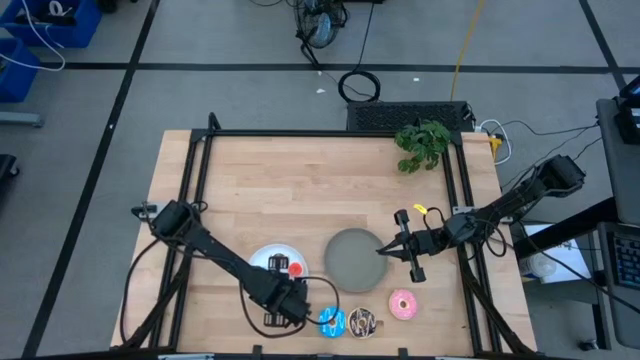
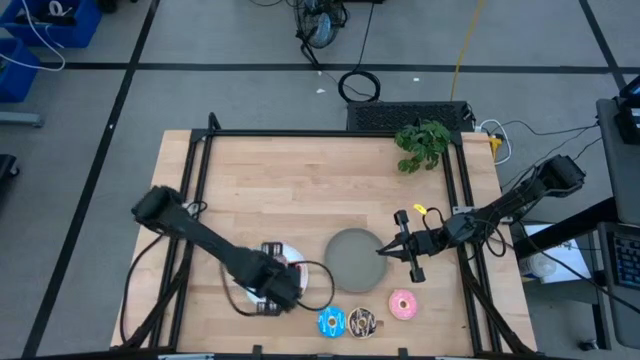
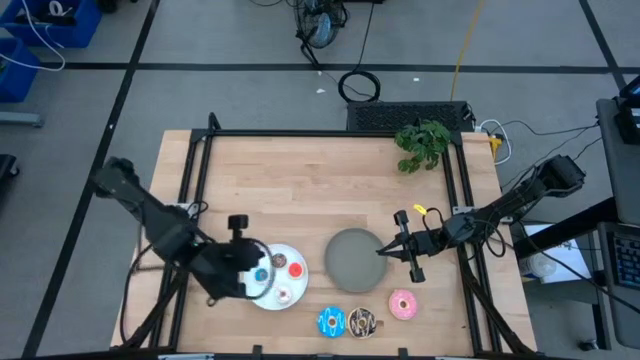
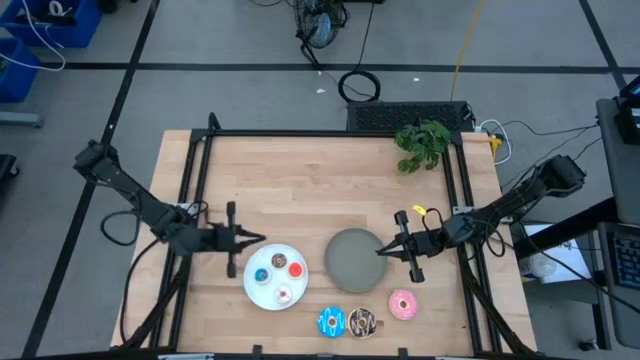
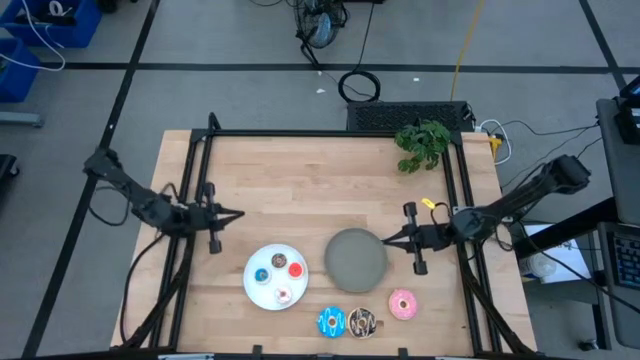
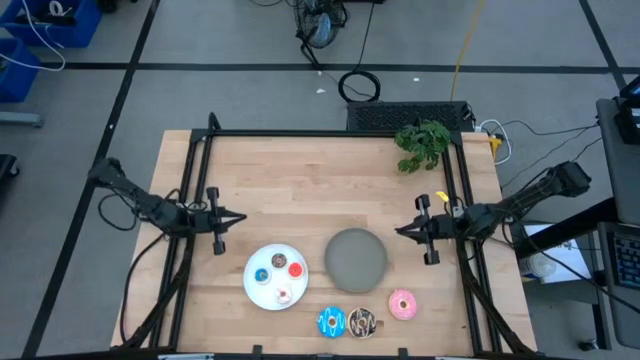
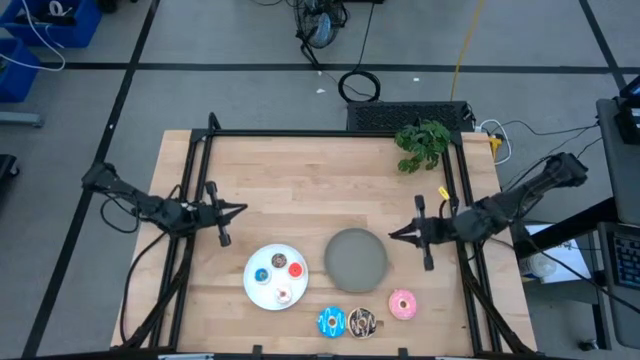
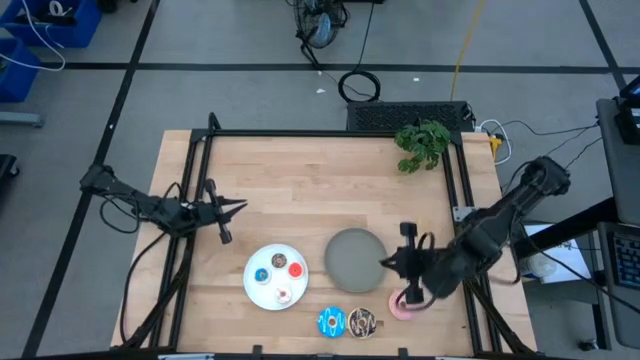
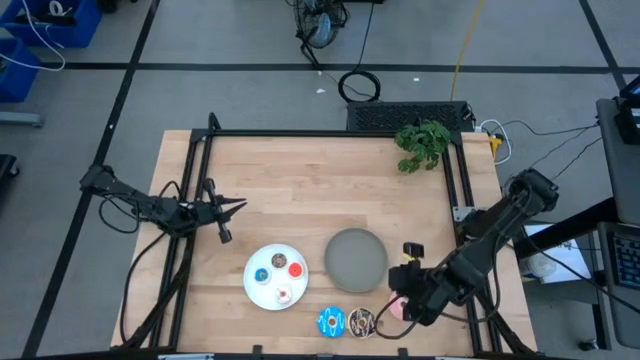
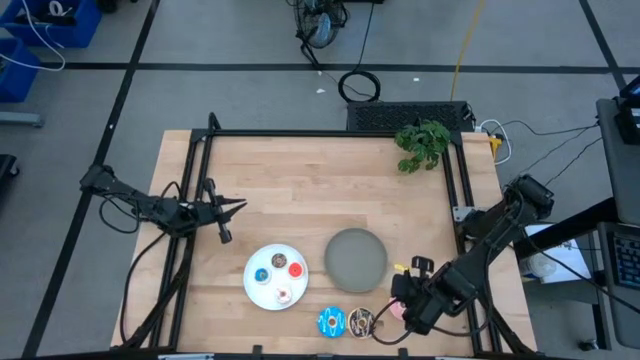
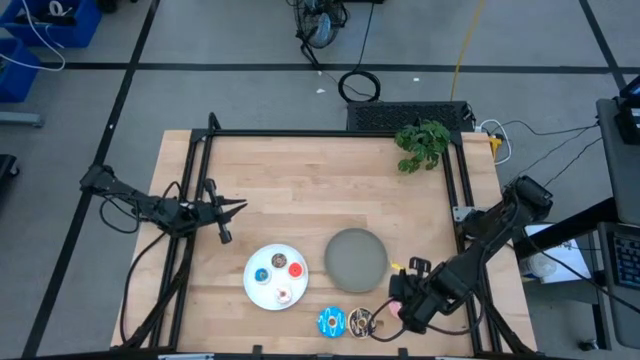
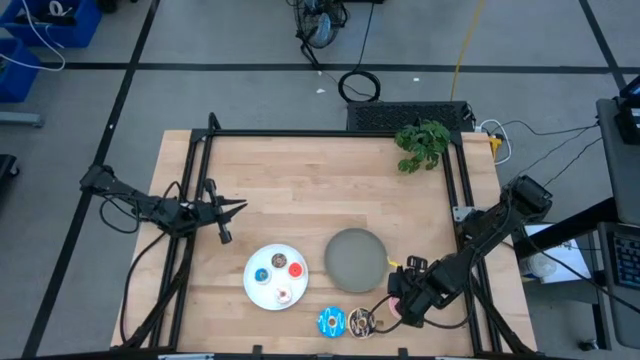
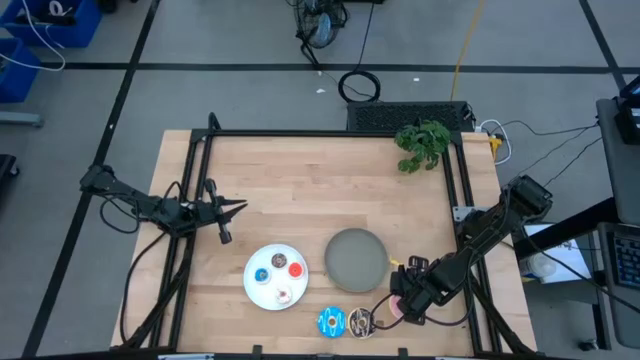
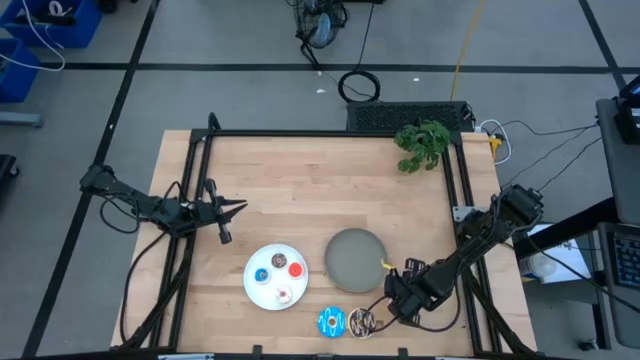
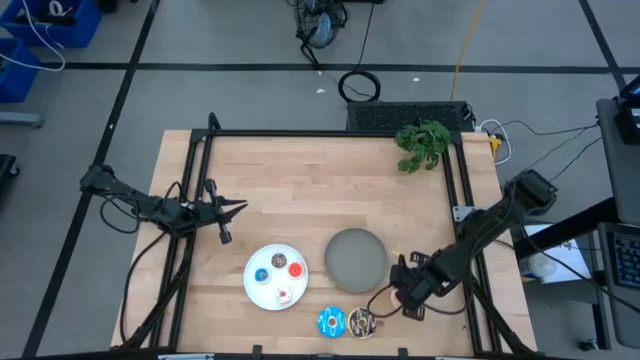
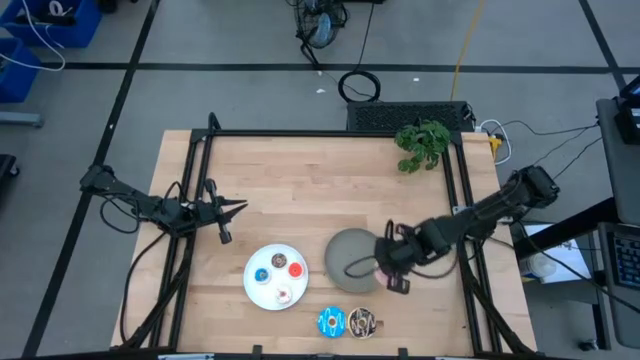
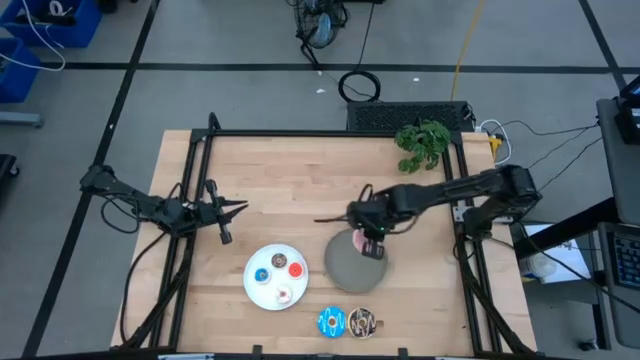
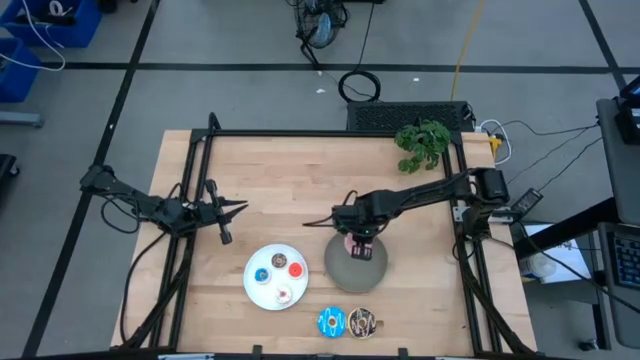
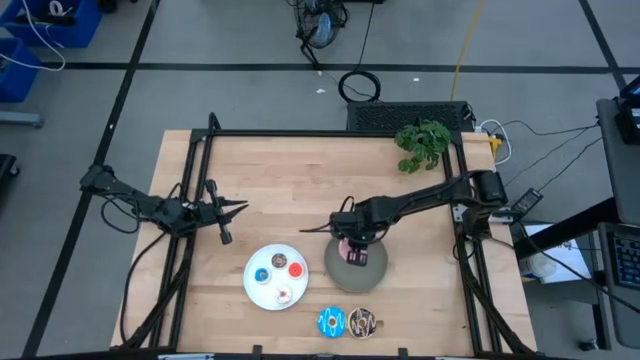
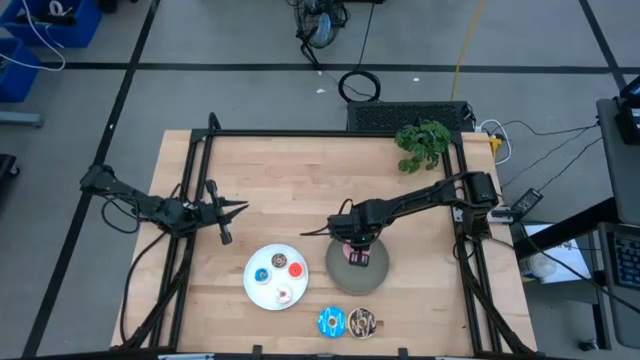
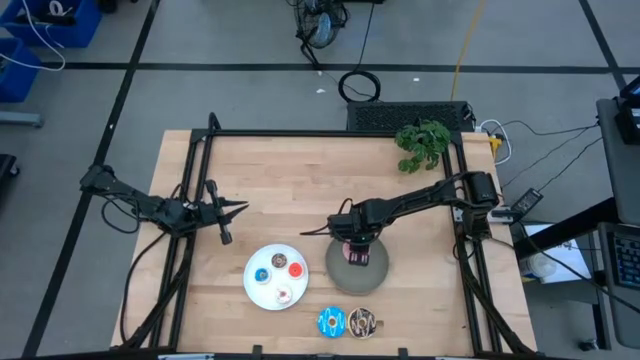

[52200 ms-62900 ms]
Task: Pick & Place donuts
Put the large pink donut on the gray plate

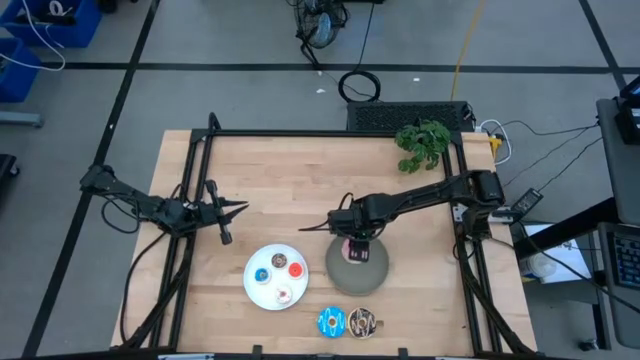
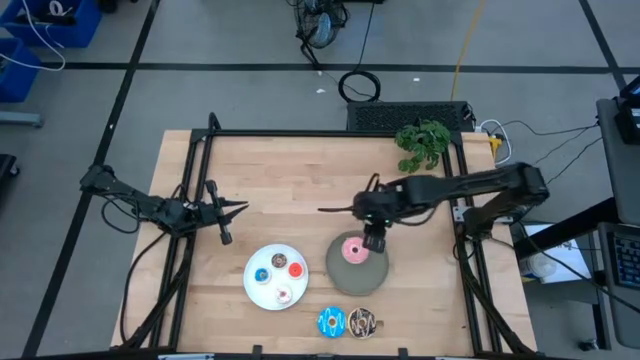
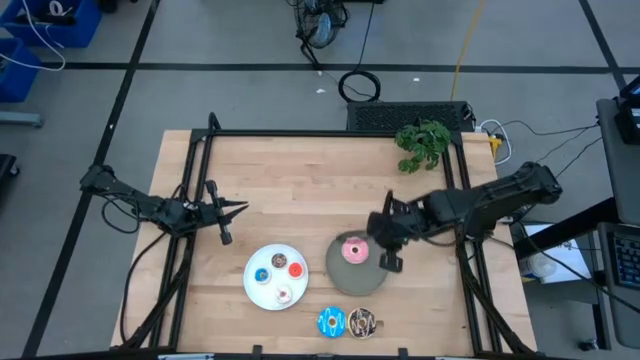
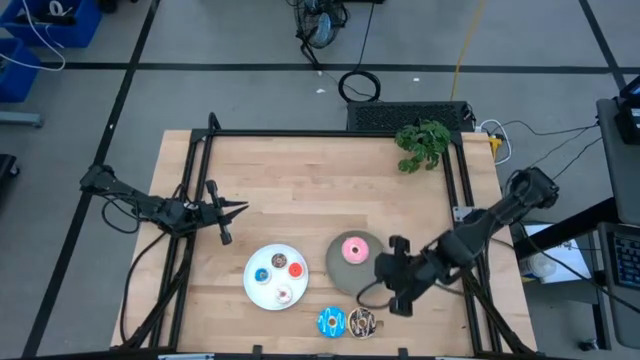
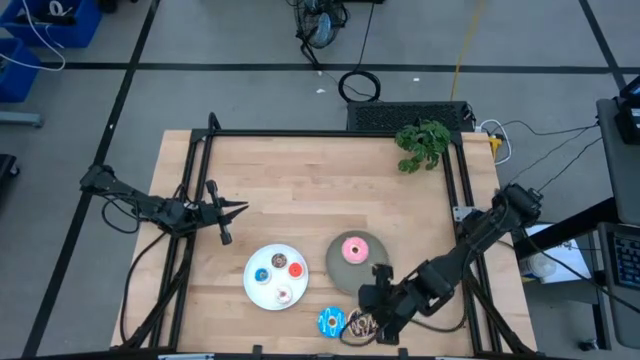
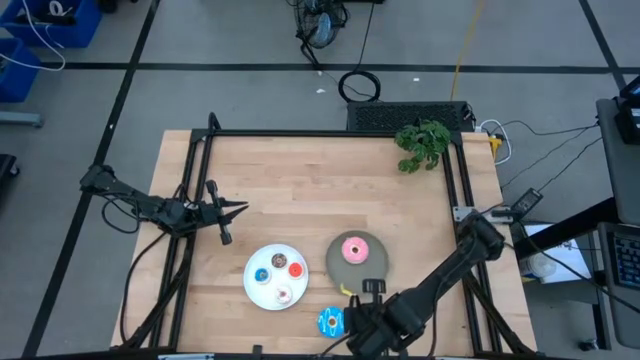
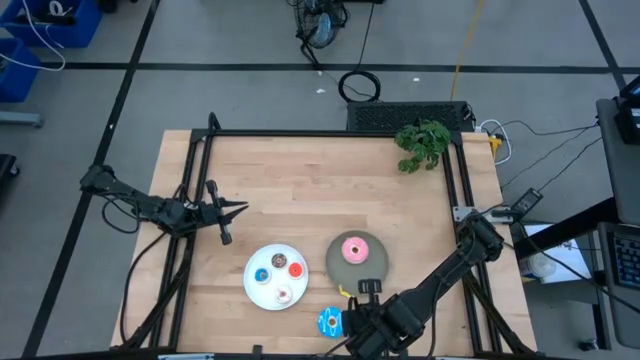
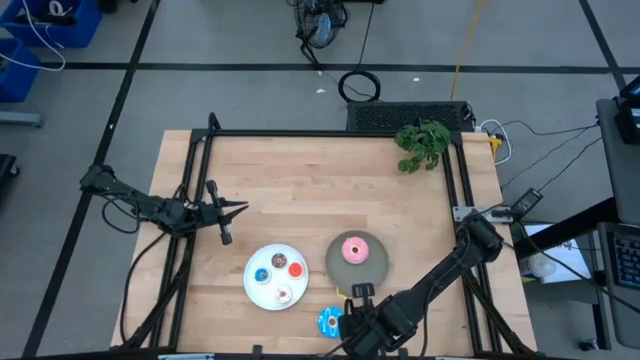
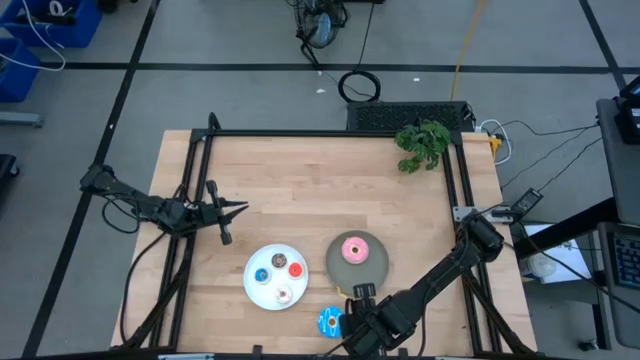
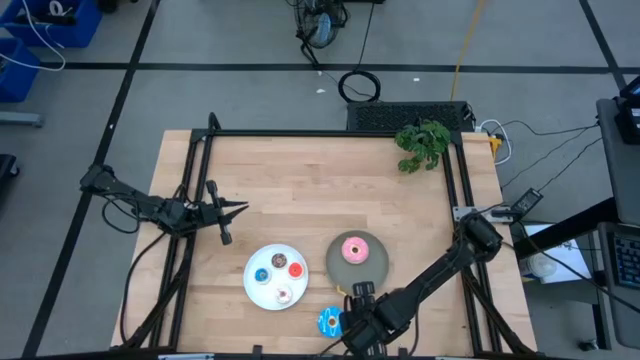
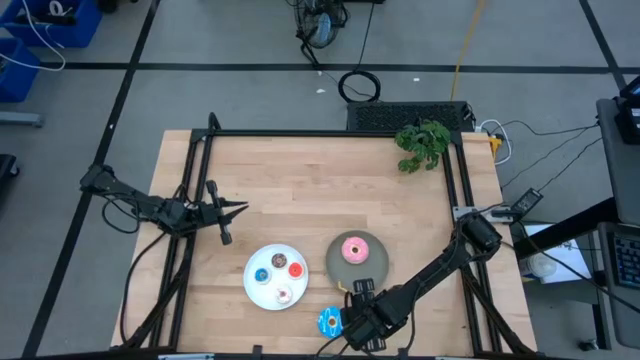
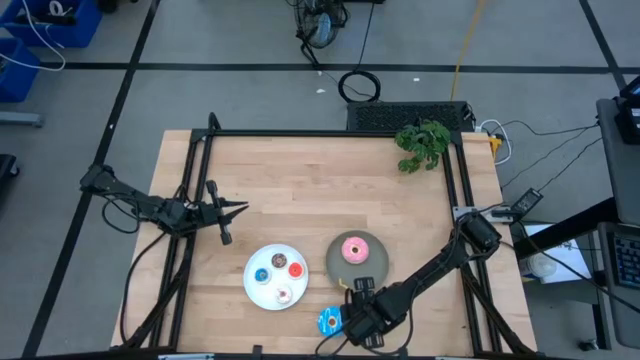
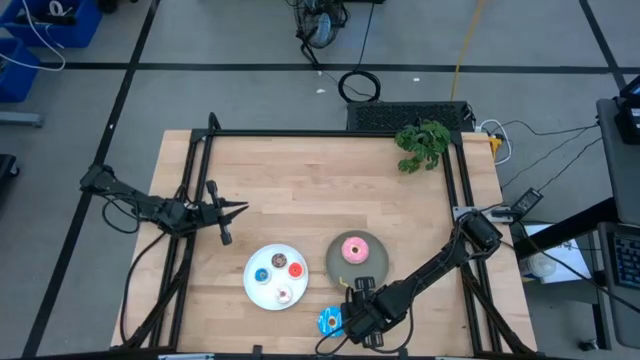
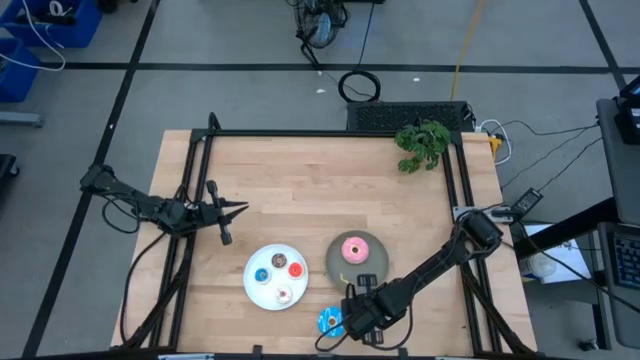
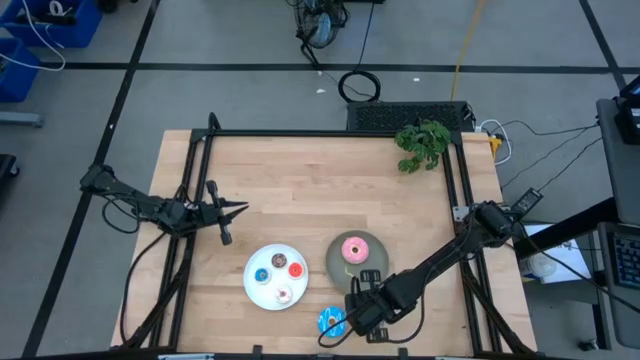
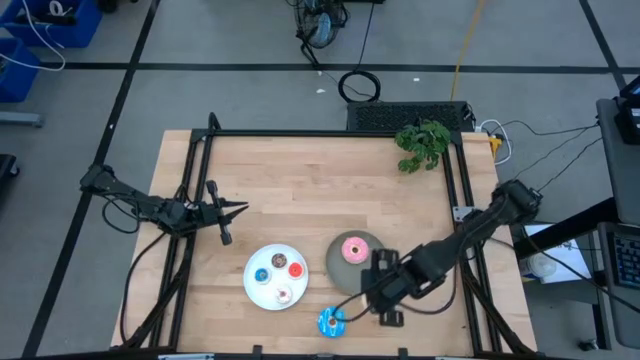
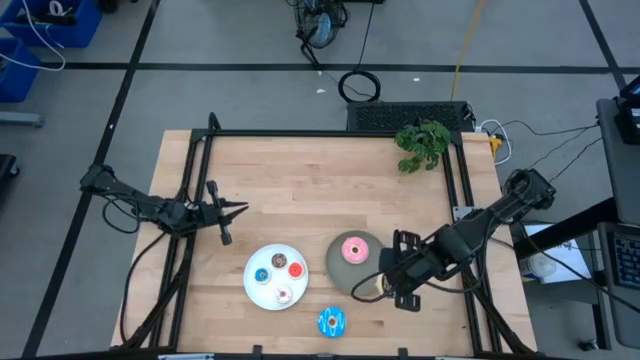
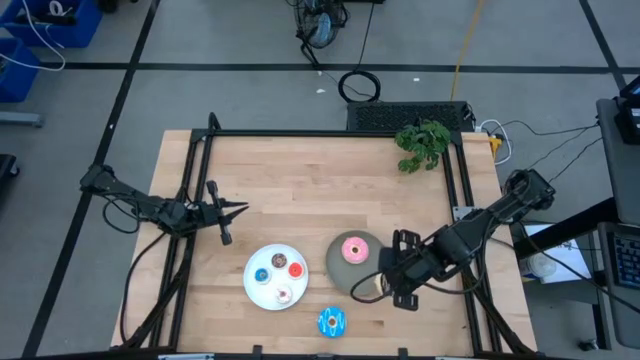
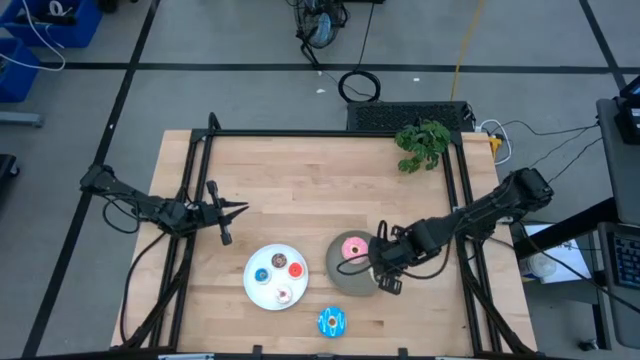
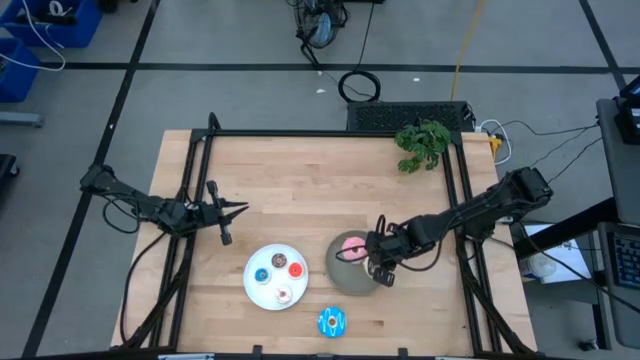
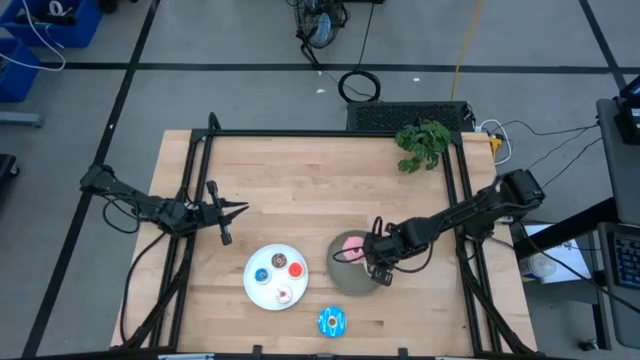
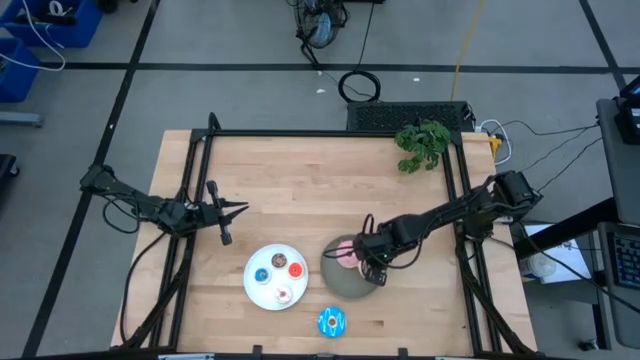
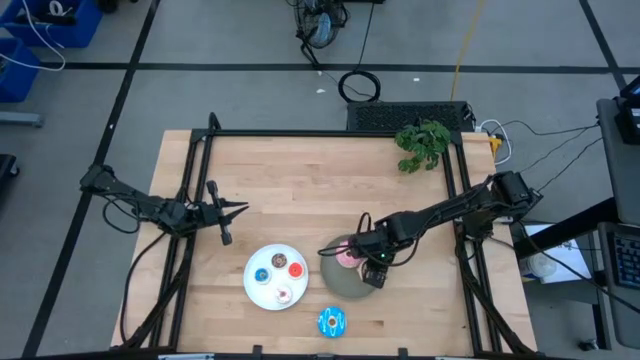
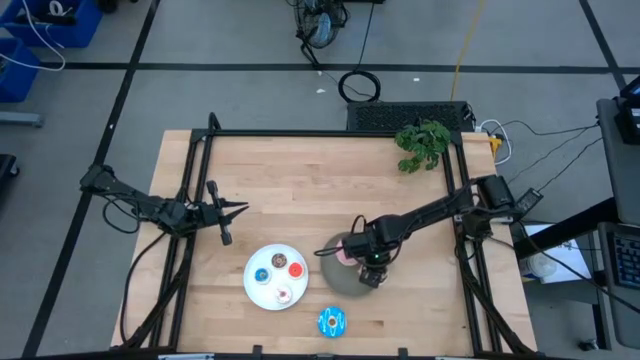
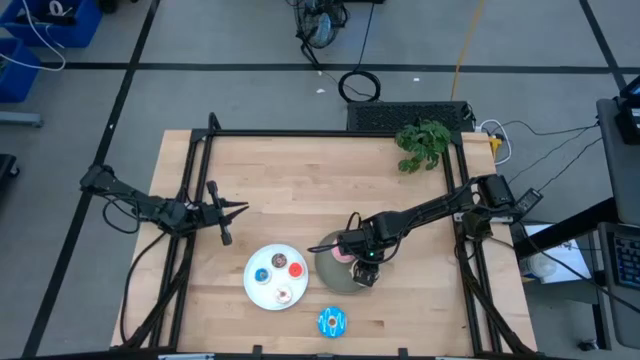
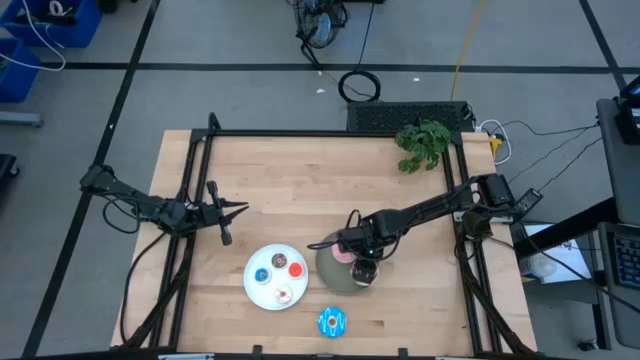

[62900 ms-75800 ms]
Put the large black donut on the gray plate
